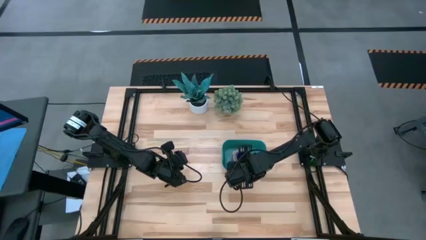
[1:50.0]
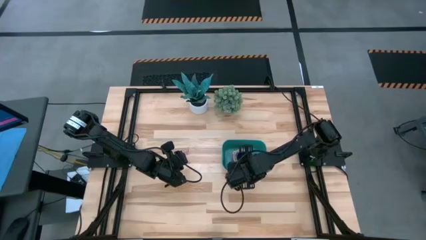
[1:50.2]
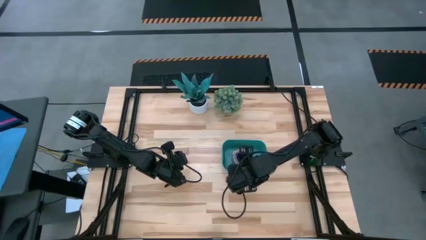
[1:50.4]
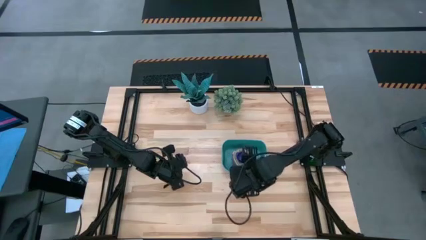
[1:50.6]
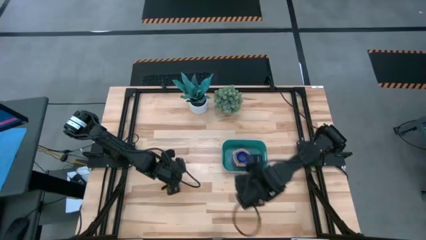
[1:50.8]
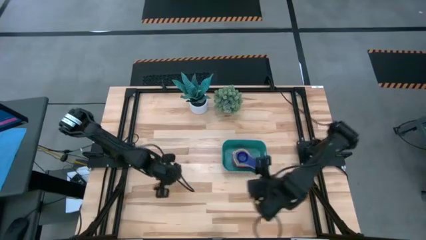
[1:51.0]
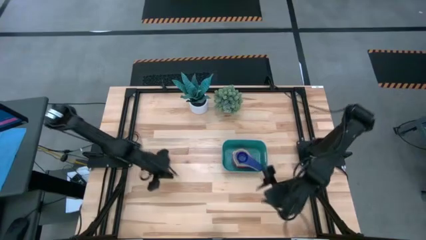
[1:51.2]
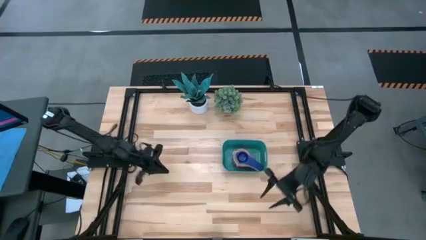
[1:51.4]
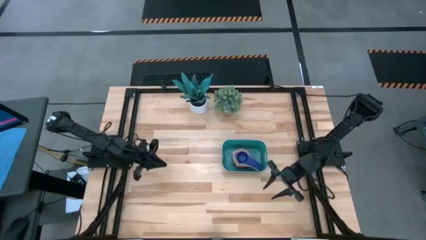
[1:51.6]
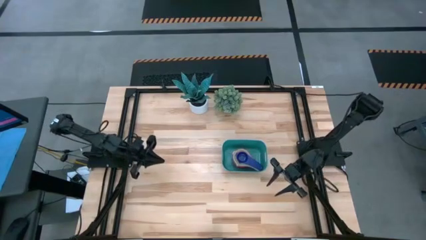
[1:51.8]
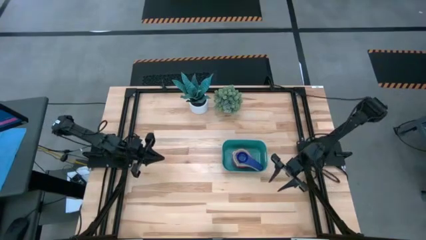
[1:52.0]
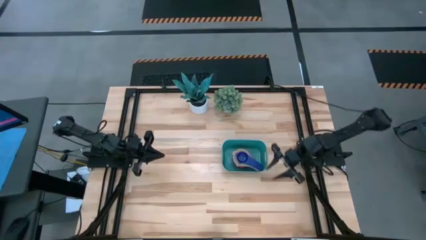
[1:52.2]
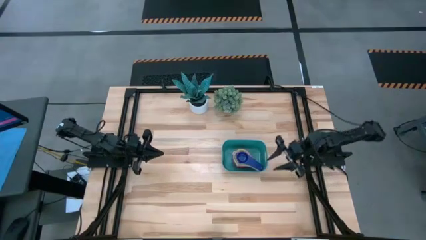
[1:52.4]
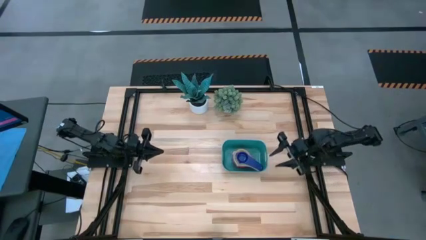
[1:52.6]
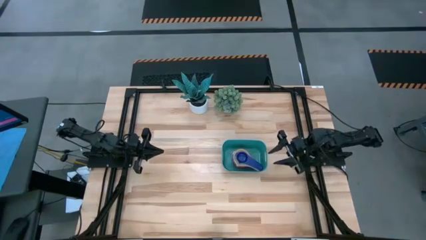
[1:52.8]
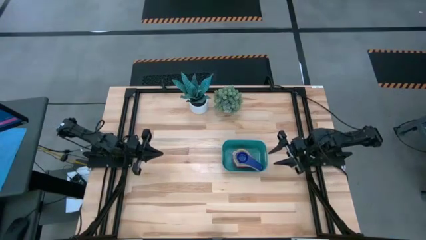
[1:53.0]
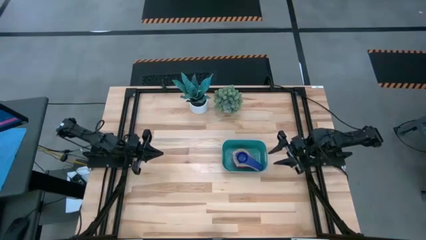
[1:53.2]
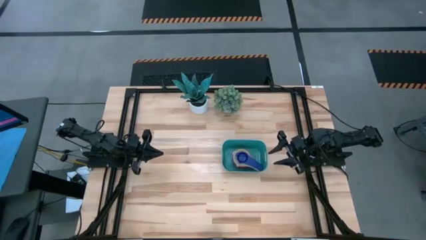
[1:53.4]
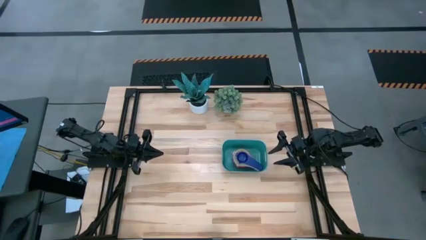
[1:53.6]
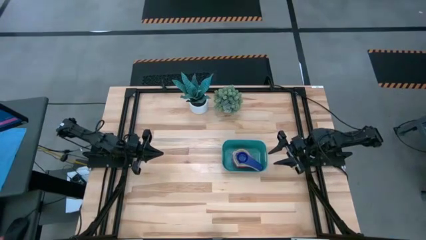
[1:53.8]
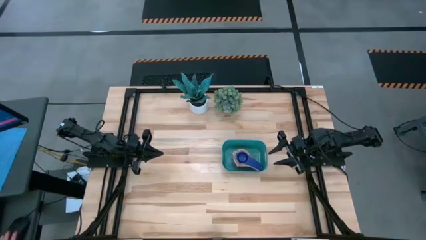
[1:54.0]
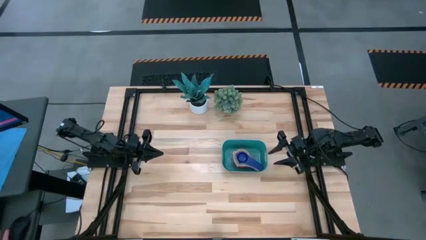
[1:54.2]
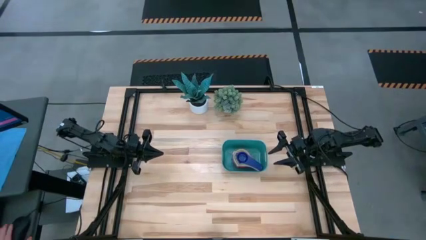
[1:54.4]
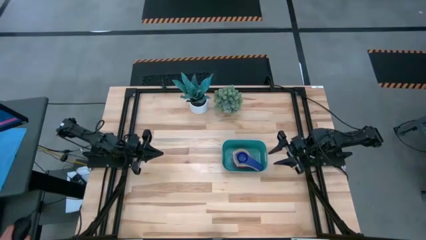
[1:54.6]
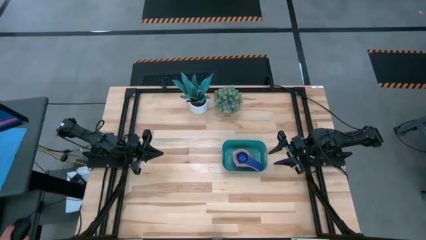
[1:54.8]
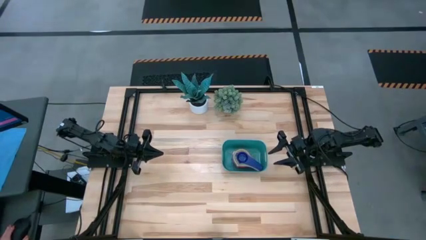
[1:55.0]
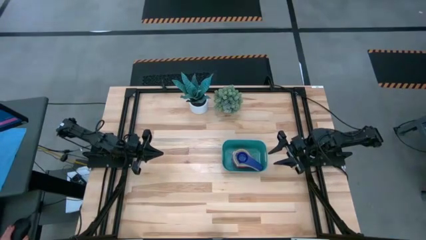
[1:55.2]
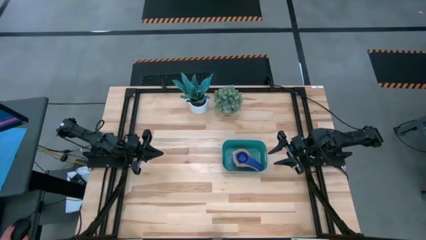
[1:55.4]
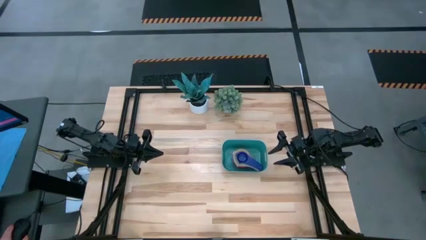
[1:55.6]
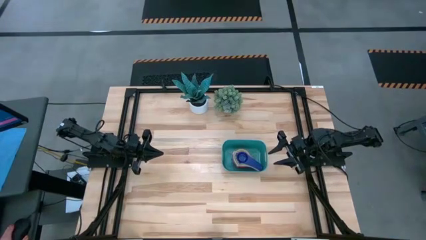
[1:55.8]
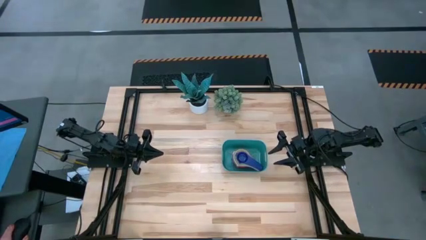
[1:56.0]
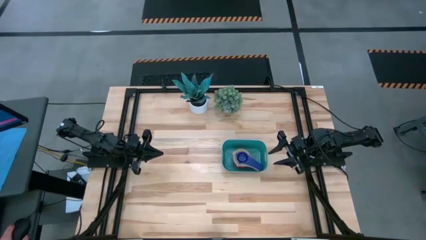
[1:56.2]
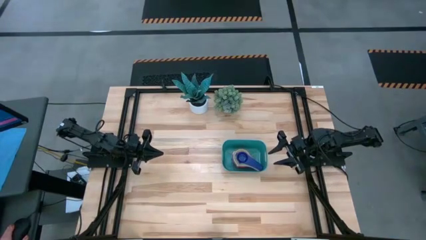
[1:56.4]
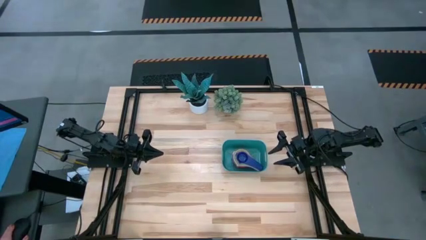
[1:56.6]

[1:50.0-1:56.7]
Task: Nest measuring cups in basket
Return to Home Position

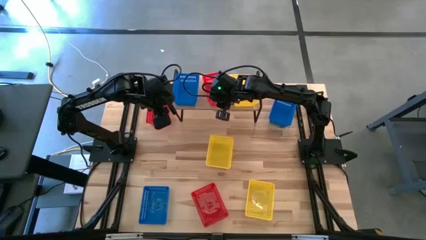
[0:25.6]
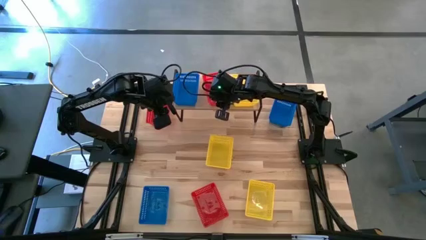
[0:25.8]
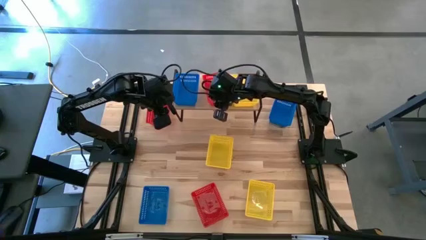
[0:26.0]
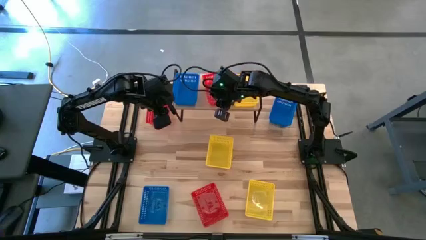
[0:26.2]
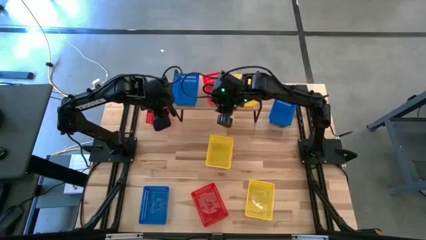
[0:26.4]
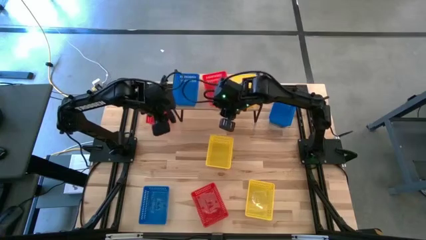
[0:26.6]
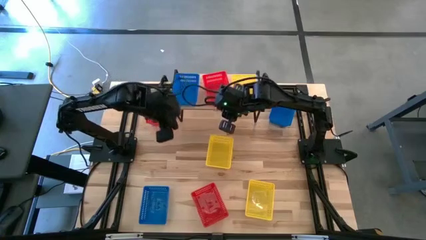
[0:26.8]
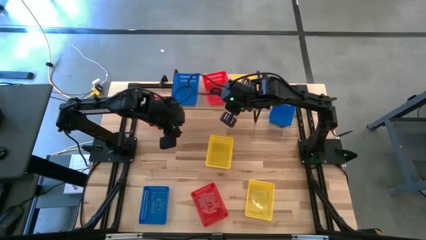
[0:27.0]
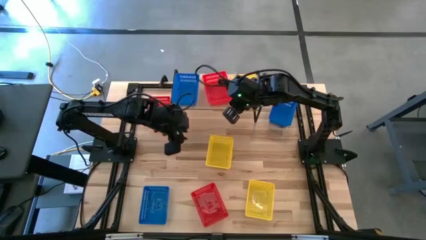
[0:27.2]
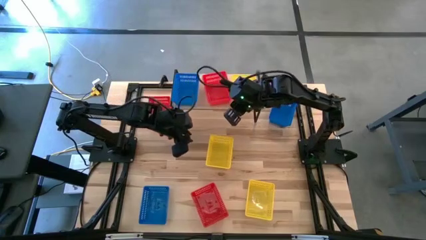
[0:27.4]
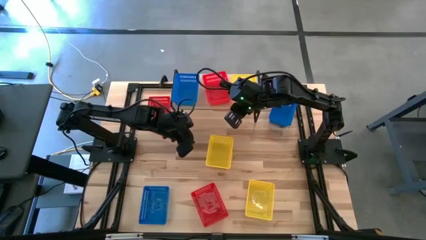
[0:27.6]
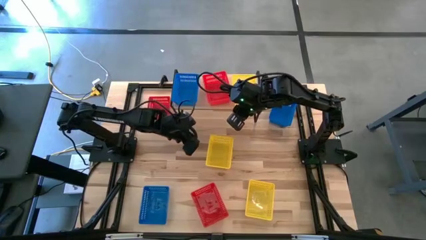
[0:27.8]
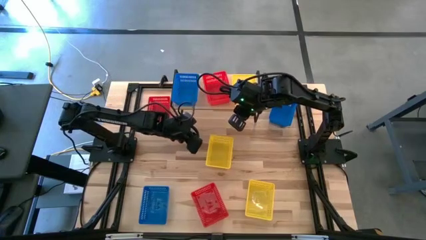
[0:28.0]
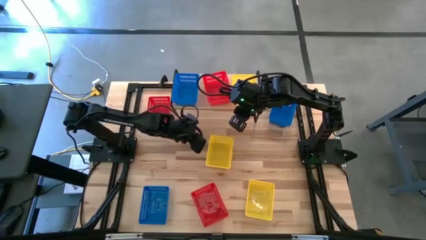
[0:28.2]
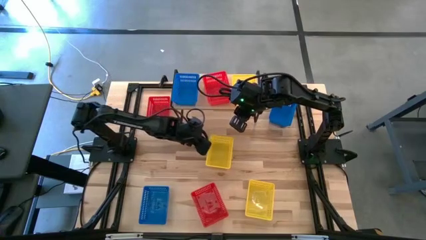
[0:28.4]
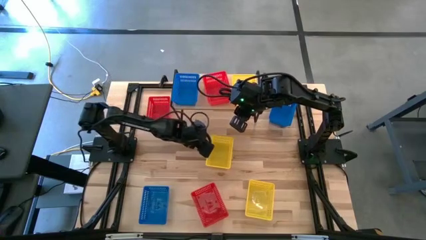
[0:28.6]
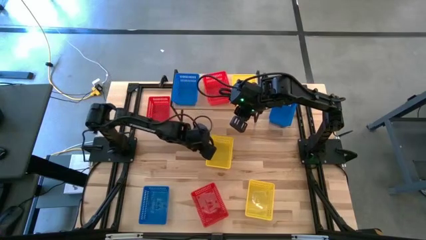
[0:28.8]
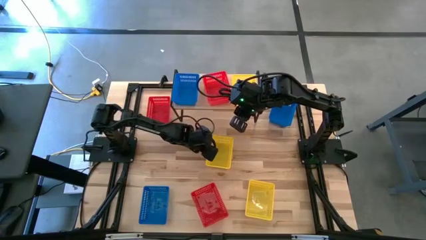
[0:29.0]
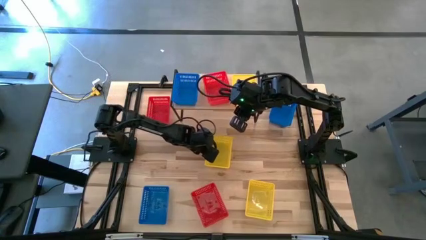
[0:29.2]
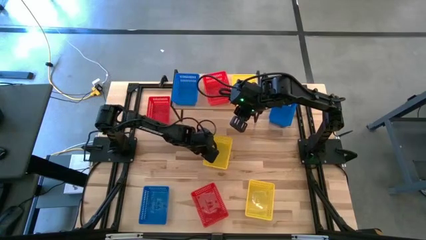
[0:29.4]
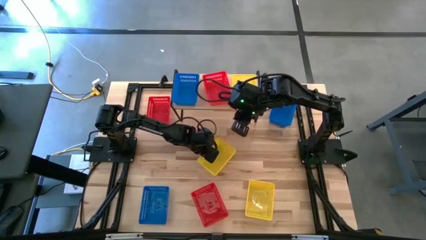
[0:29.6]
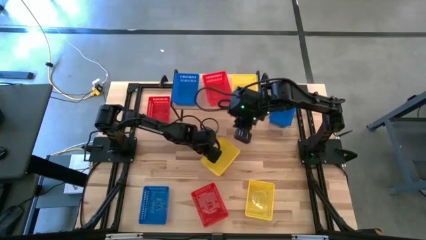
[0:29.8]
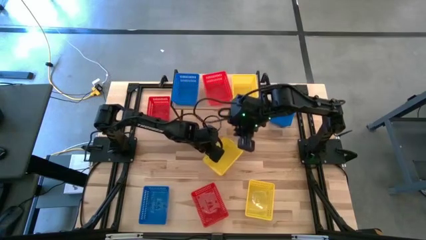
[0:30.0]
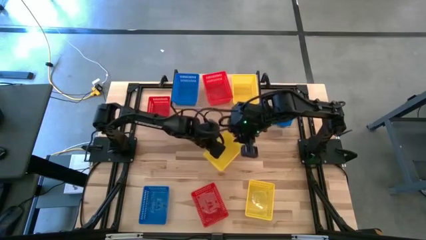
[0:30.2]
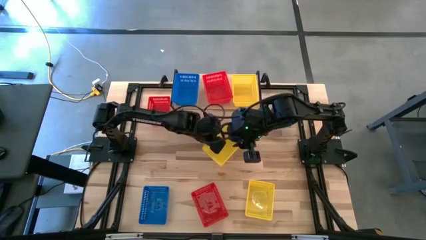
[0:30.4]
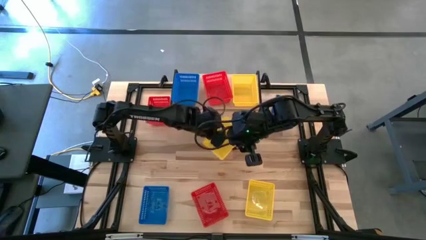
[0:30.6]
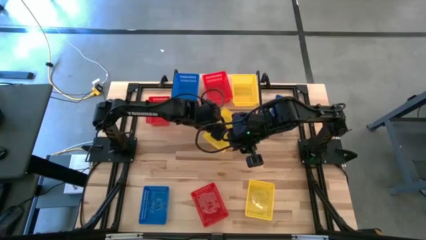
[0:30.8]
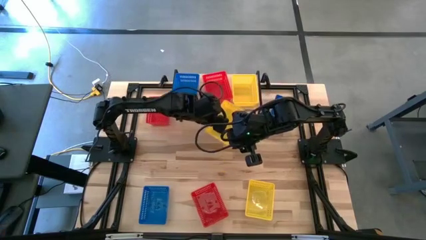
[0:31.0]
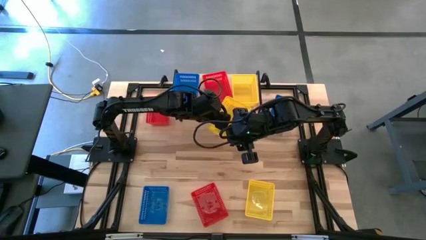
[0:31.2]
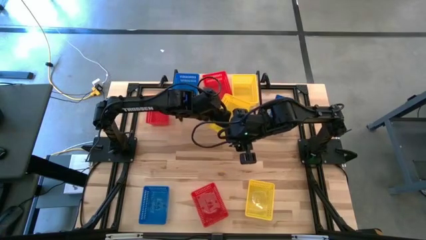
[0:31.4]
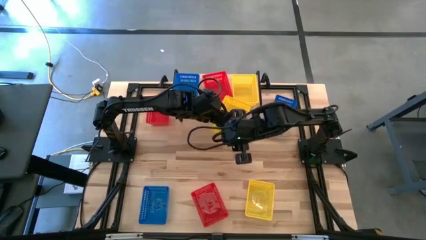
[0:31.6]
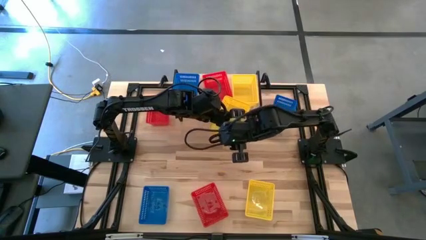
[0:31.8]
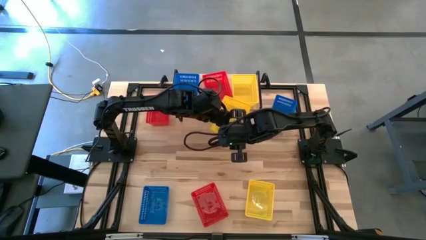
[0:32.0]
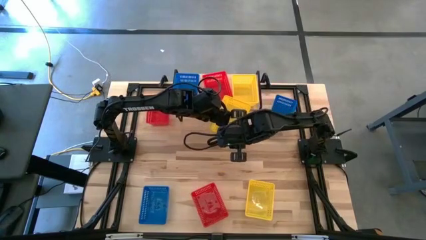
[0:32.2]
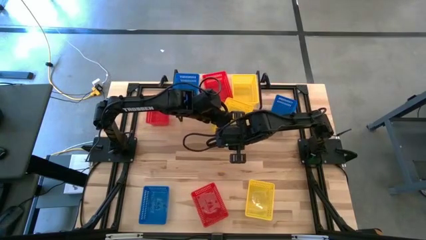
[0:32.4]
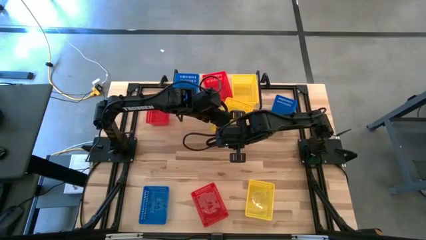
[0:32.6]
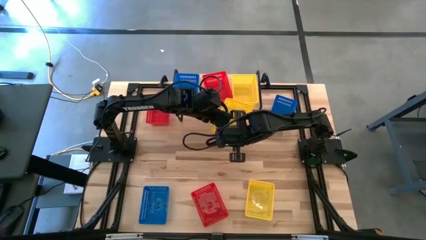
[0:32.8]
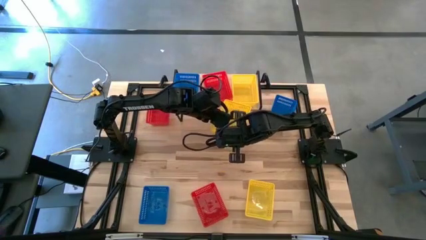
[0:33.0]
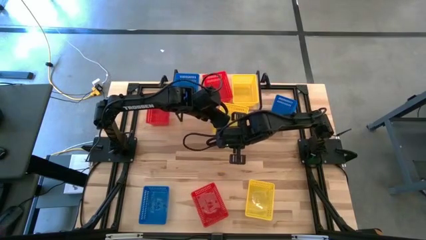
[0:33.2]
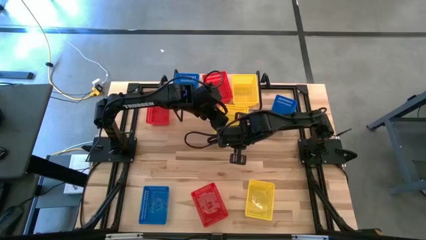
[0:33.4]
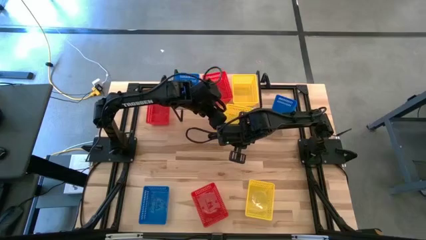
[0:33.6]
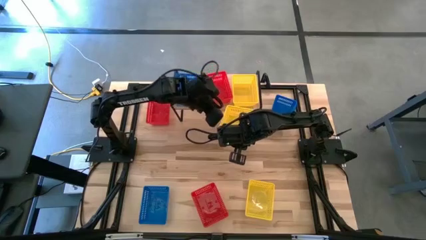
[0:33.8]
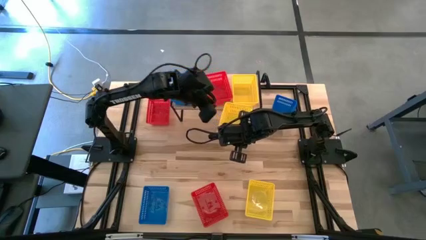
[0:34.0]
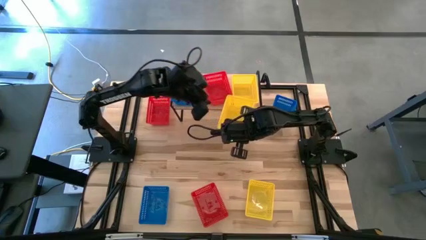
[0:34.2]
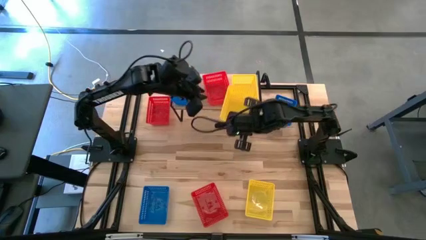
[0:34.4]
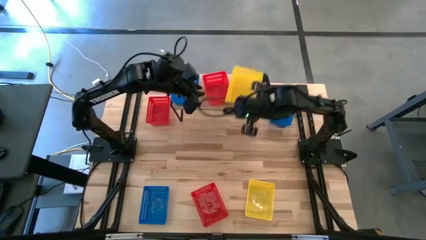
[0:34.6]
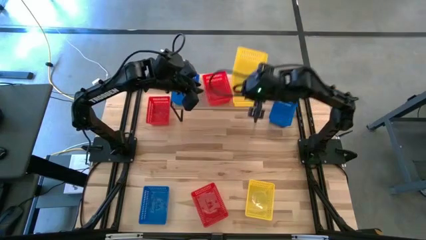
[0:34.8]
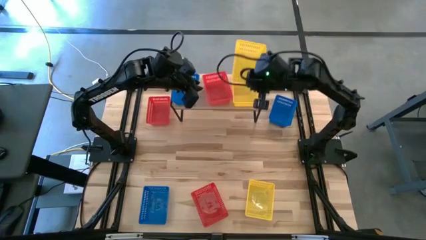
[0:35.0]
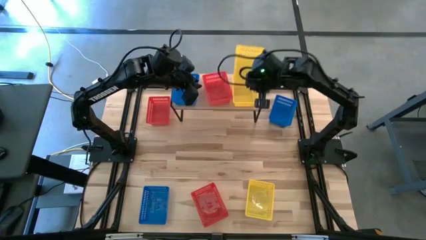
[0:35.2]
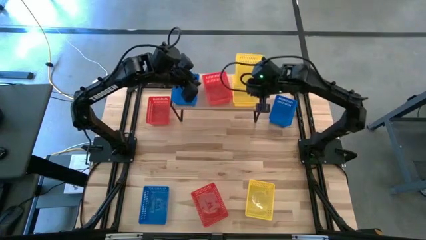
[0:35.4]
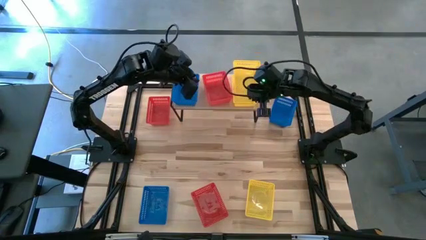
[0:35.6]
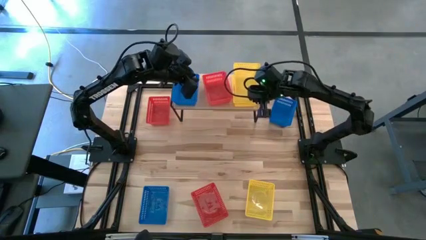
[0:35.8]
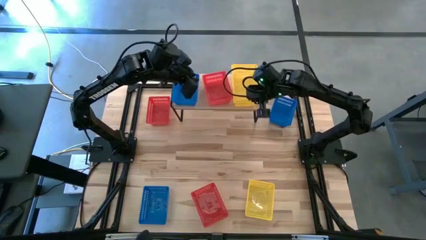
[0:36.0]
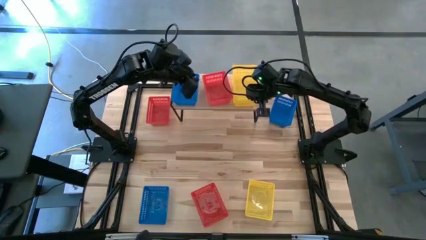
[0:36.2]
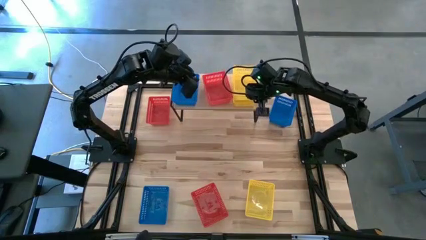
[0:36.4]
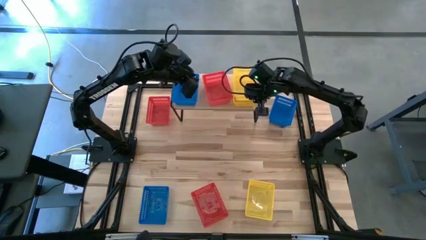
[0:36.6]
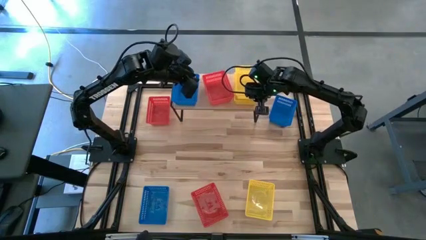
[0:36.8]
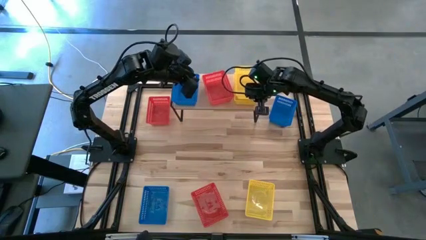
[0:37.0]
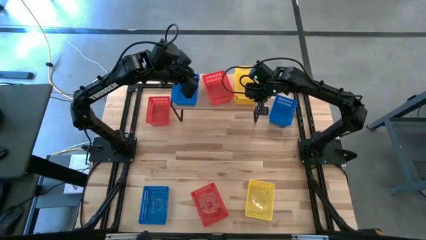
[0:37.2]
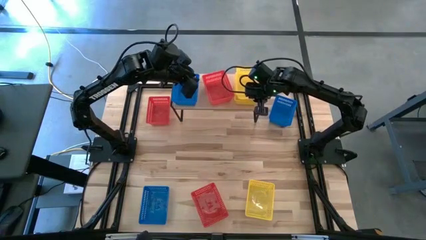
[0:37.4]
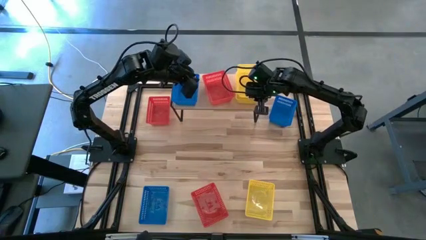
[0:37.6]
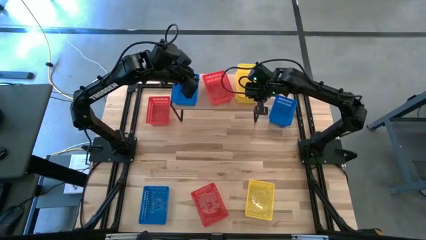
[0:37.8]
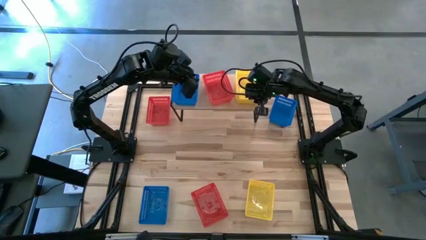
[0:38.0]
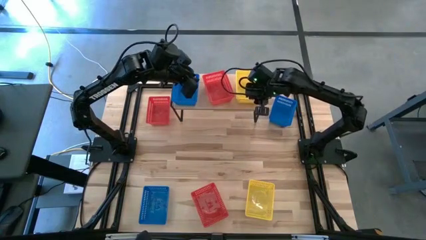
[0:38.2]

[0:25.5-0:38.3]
Task: Stack baskets on shelf by color
Stack the top yellow basket into the other yellow basket on the shelf
